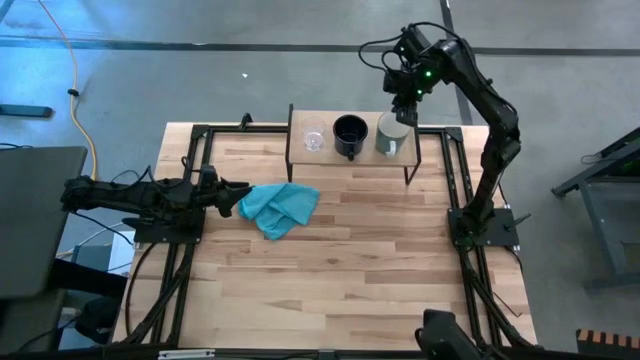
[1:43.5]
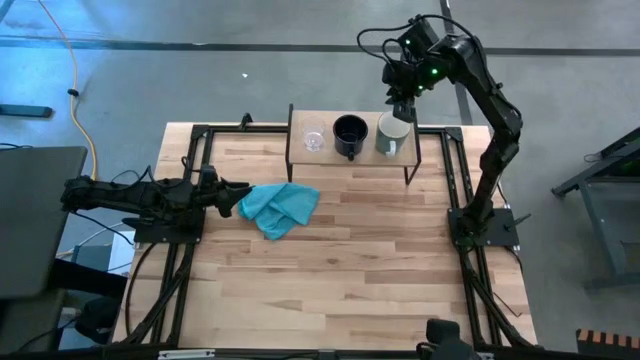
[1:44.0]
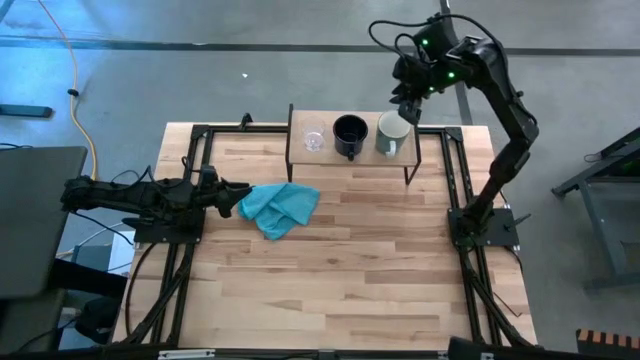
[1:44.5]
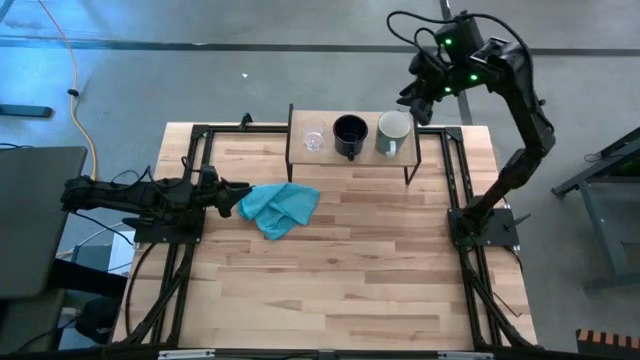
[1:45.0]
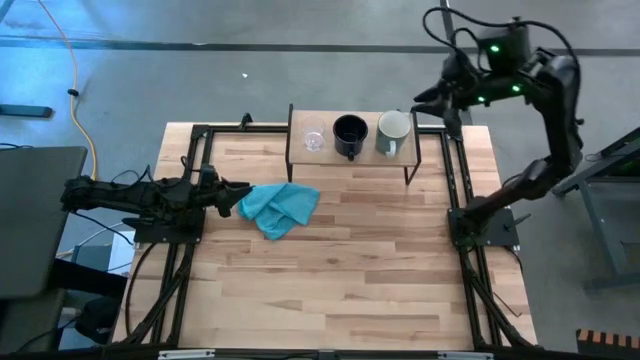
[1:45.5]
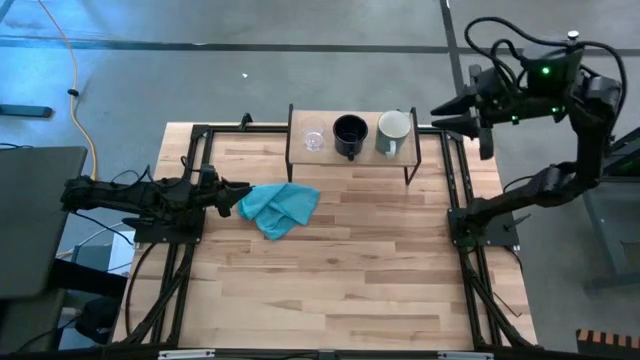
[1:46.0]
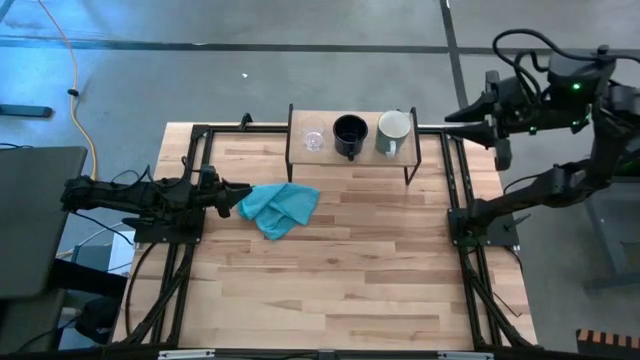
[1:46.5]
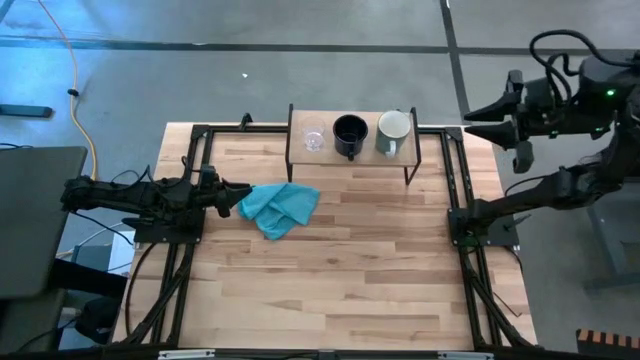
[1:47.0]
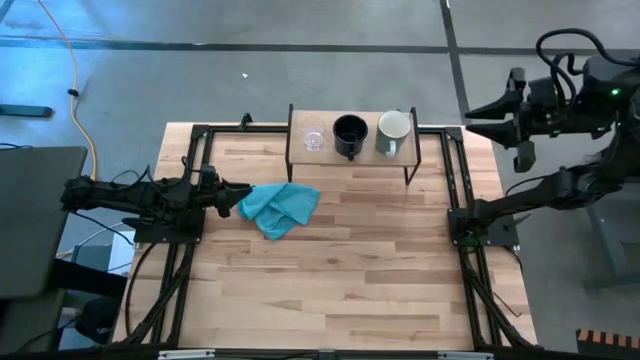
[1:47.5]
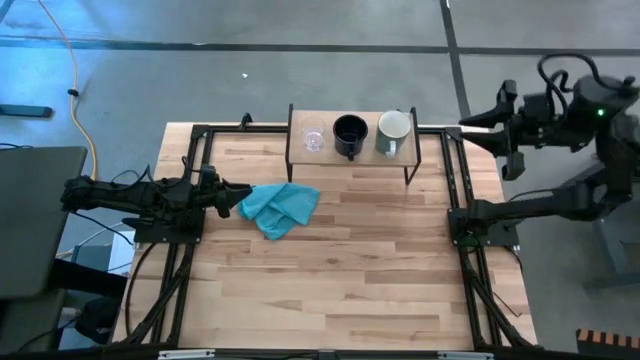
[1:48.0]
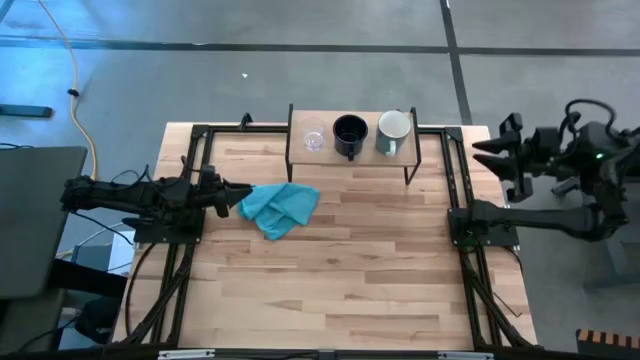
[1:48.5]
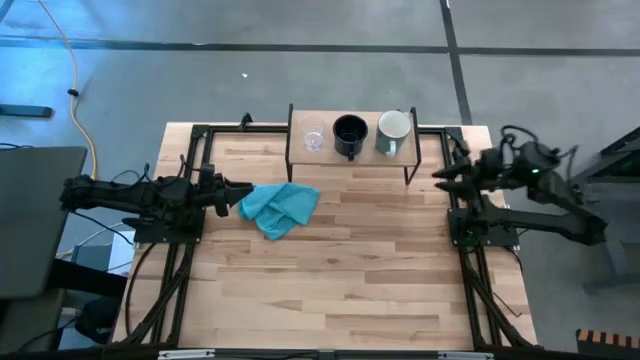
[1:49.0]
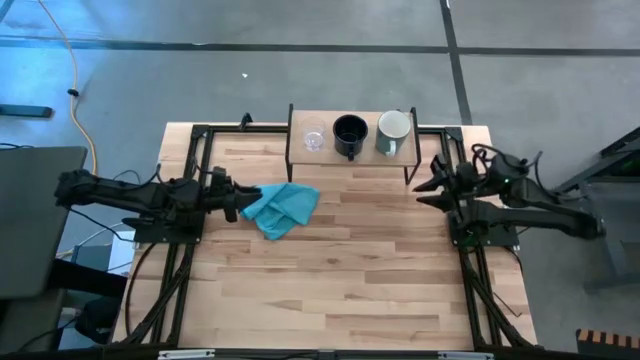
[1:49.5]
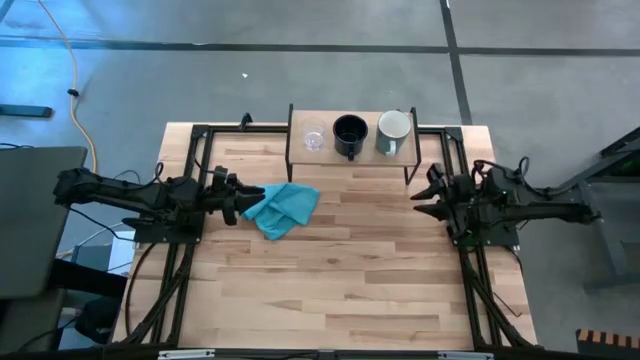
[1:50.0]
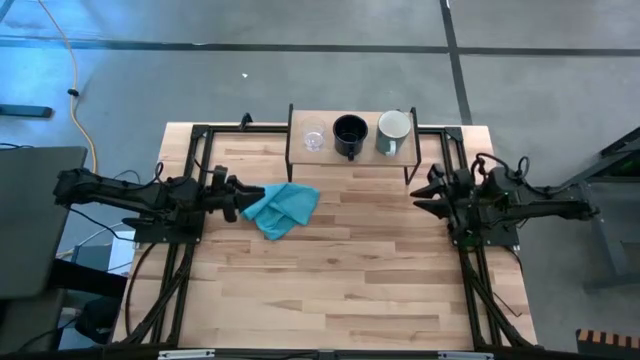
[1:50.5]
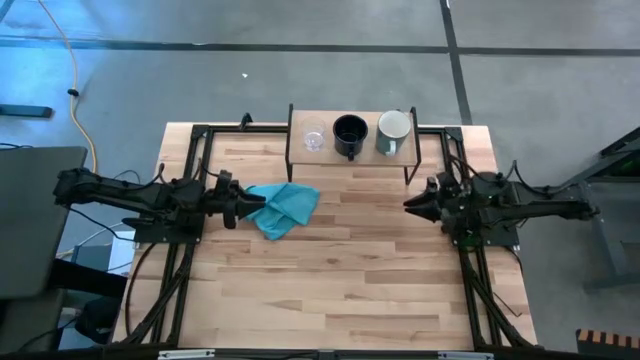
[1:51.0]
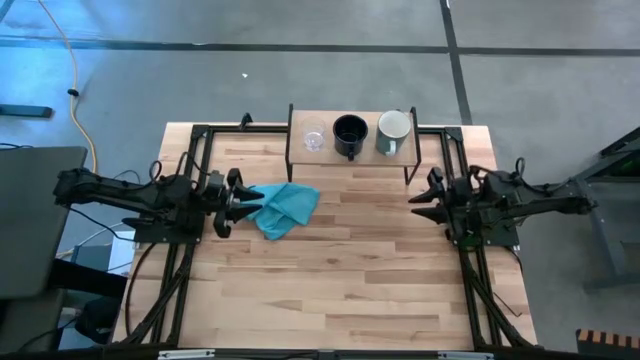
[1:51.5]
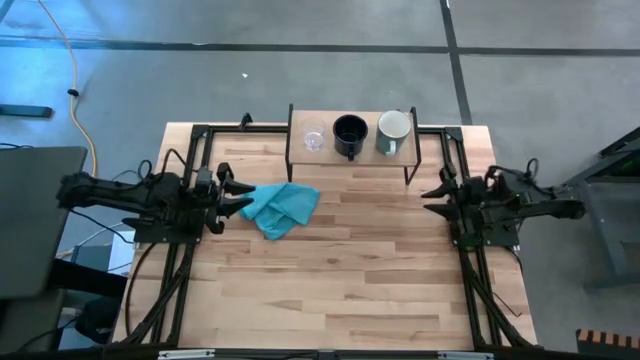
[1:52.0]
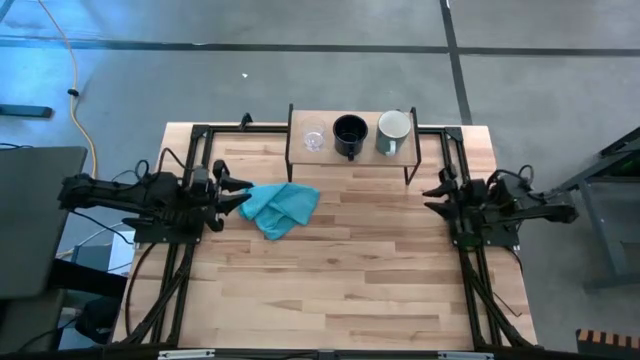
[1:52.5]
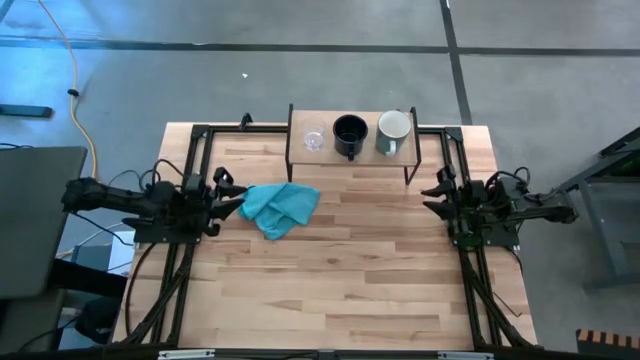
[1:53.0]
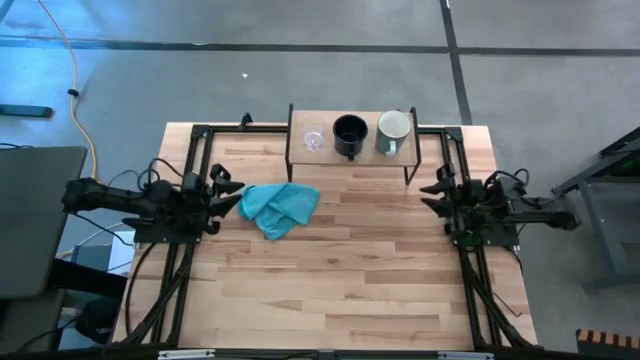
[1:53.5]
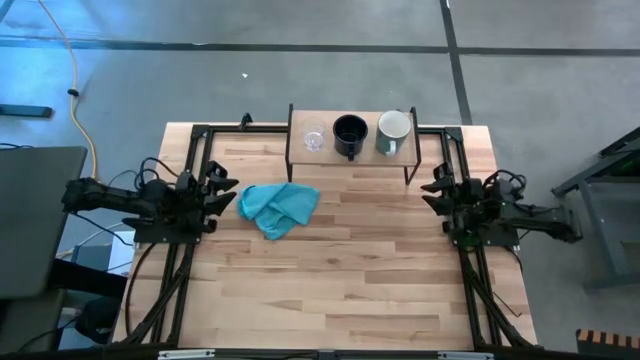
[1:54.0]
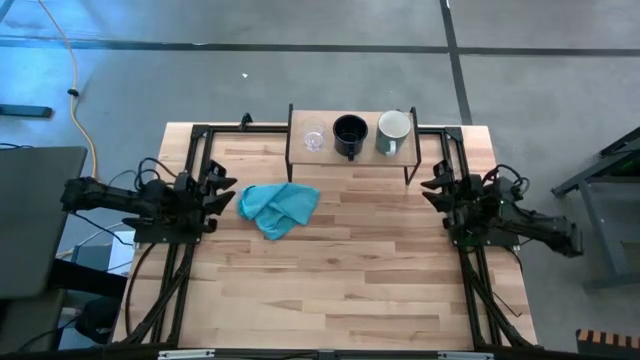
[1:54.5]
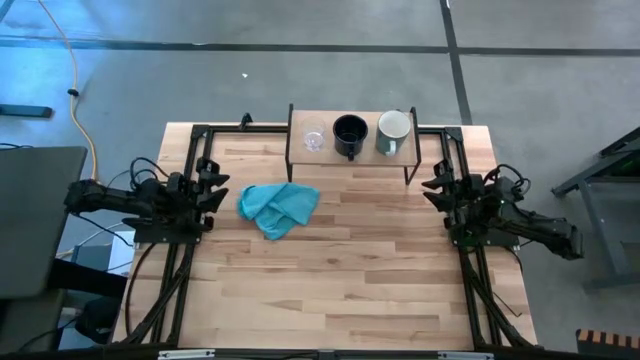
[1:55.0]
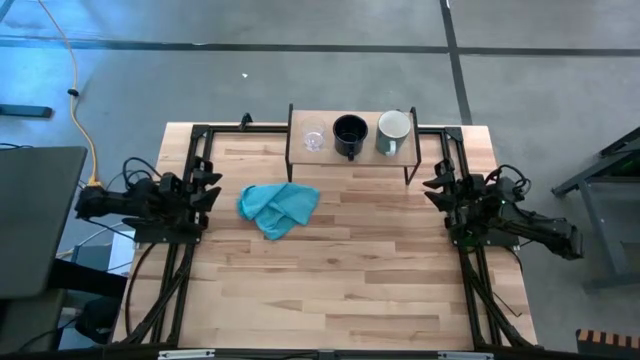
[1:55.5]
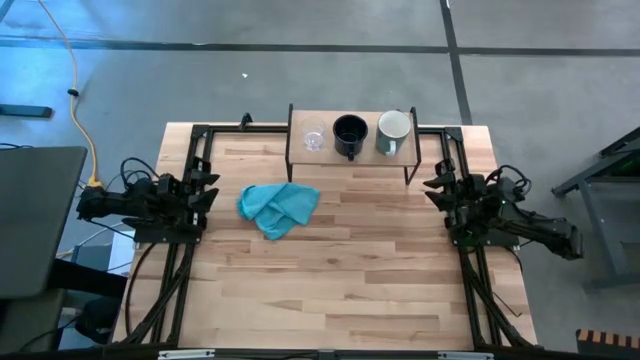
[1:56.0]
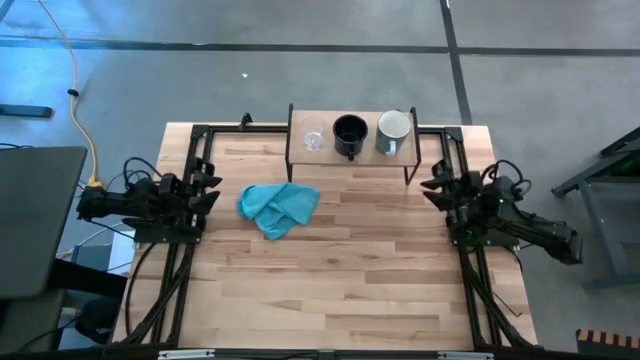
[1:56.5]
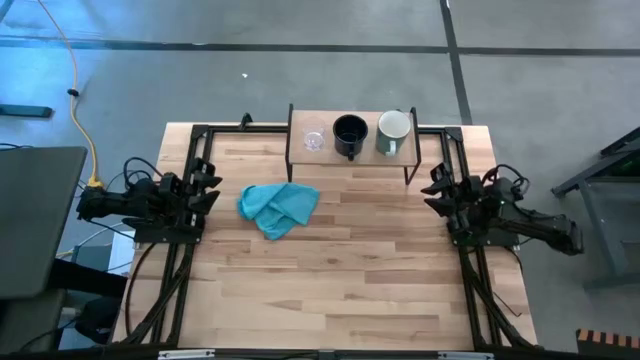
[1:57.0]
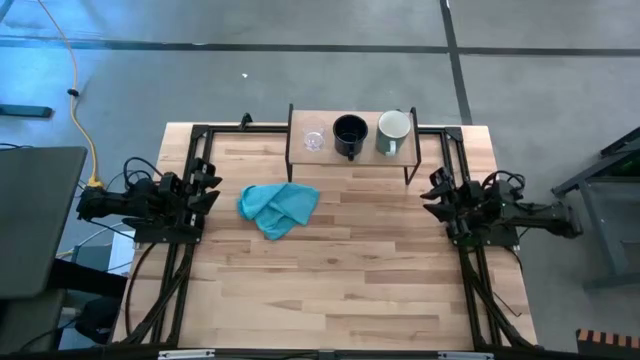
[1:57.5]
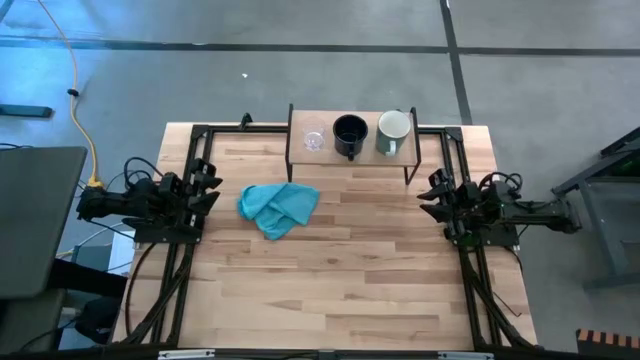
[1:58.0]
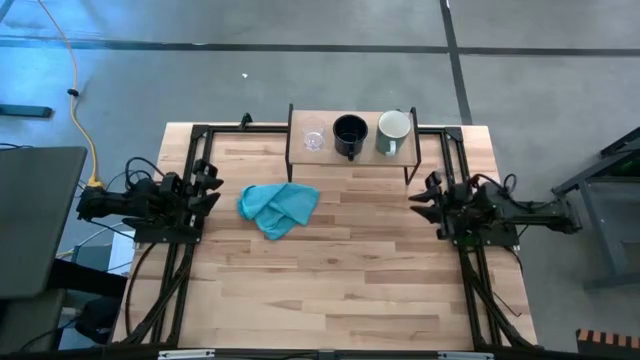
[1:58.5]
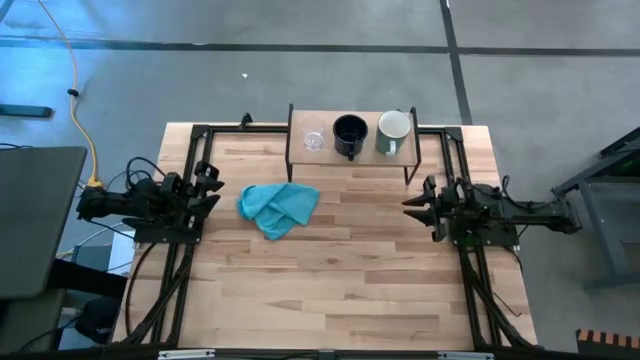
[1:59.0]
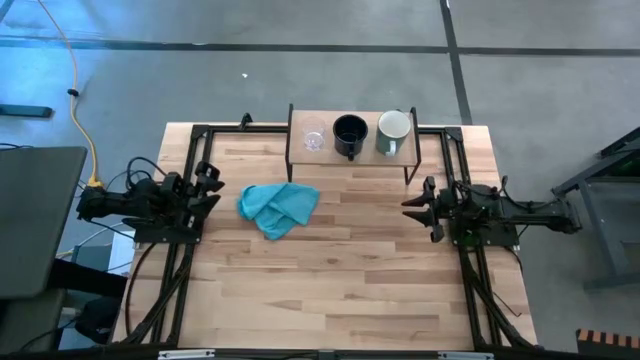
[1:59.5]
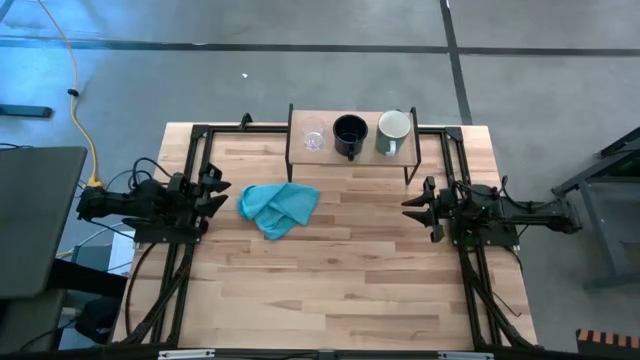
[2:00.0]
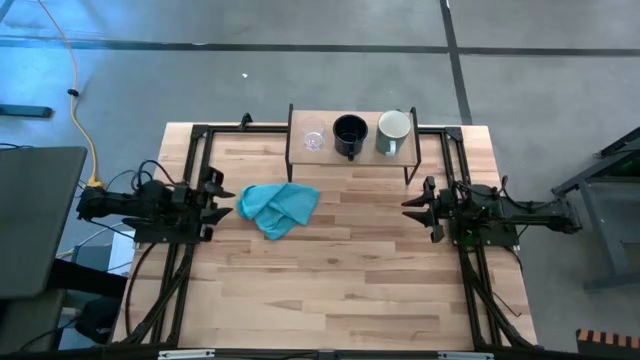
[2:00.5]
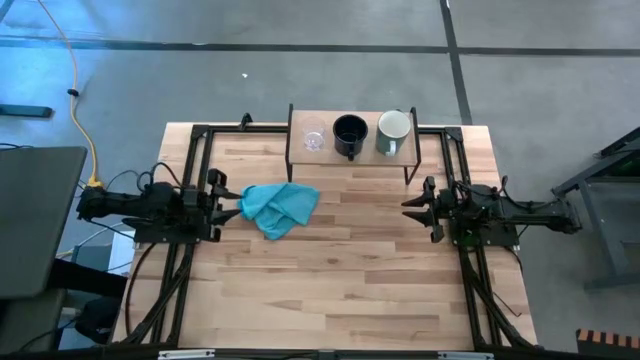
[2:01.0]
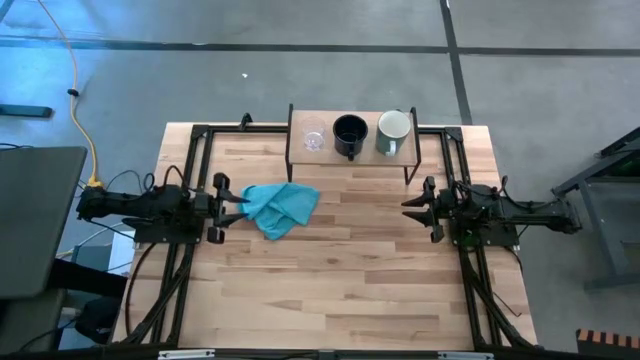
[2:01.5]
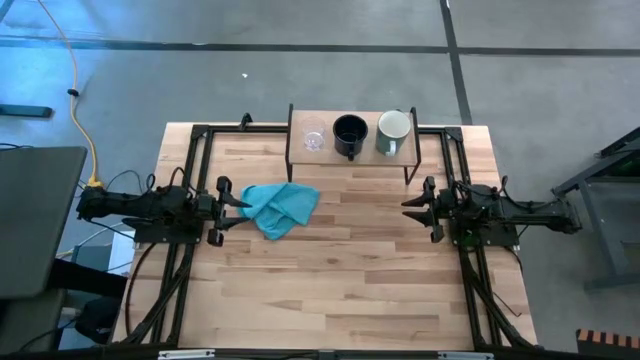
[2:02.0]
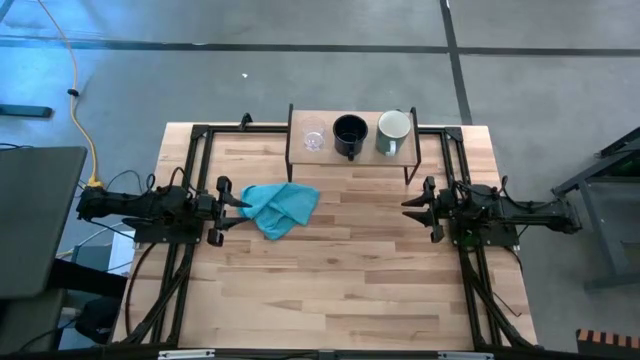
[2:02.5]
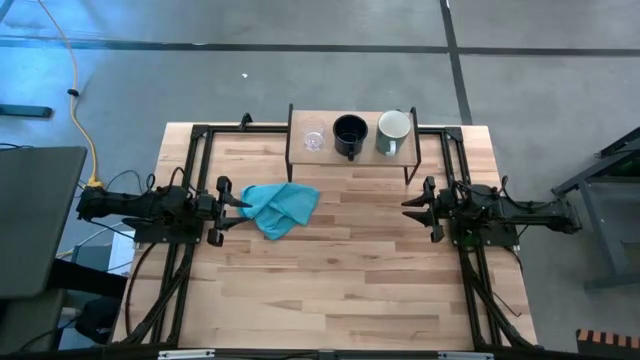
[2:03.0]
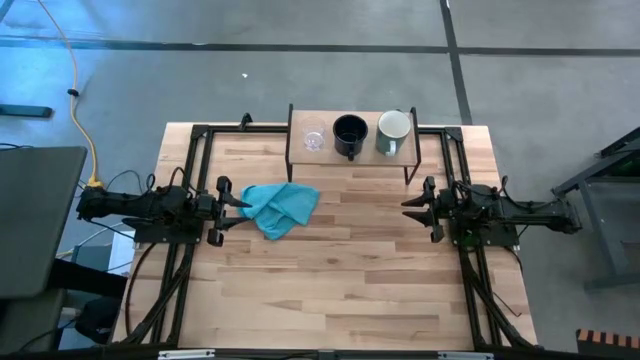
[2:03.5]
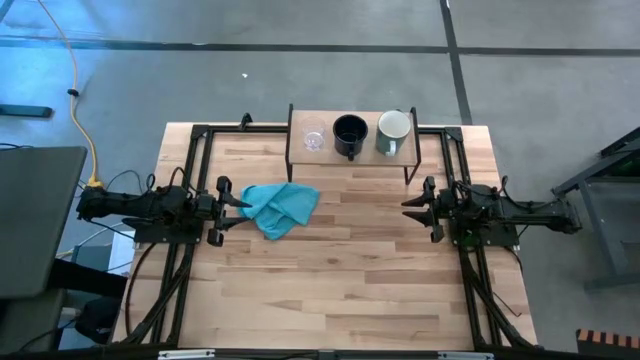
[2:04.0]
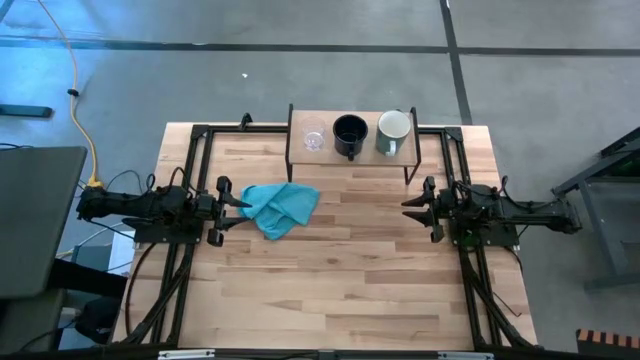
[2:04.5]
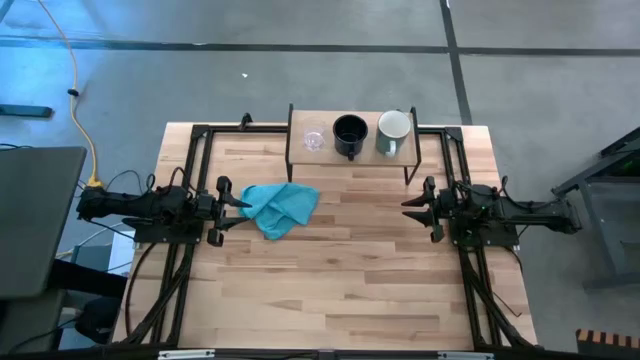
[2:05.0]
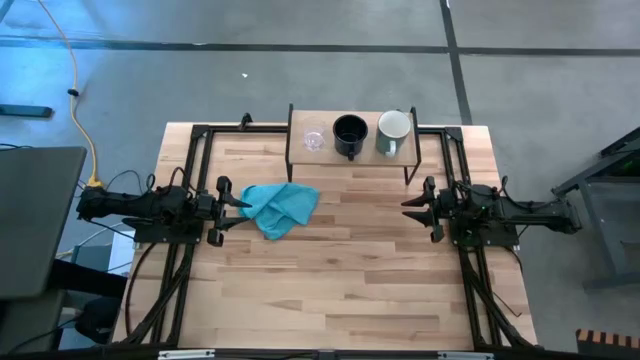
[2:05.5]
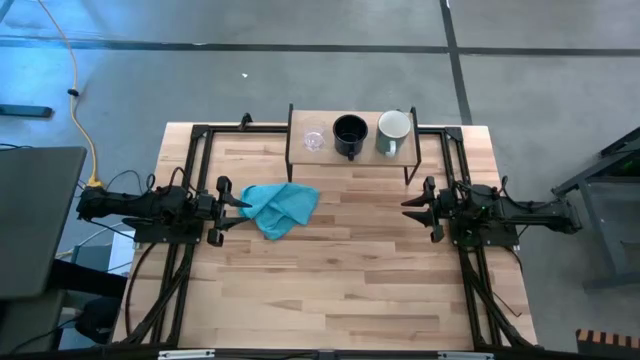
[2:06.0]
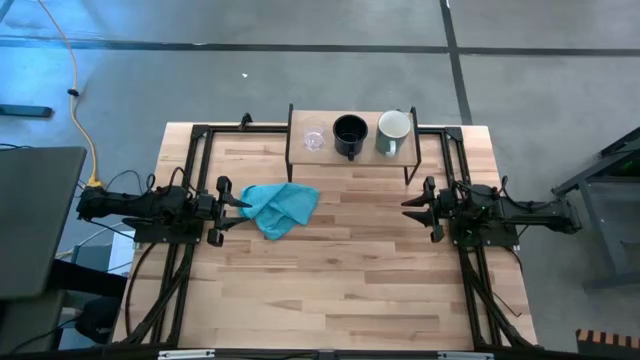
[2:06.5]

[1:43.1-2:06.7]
Task: Stack small to large cups/mugs on shelf
Return to Home Position
